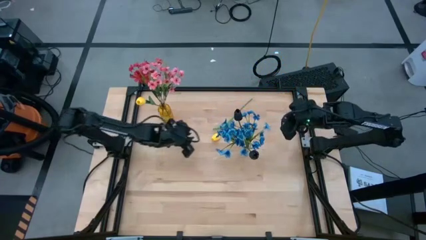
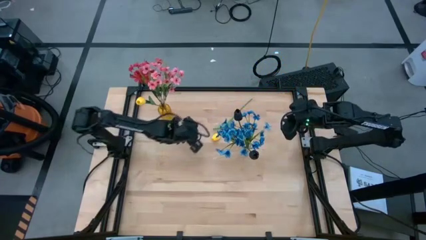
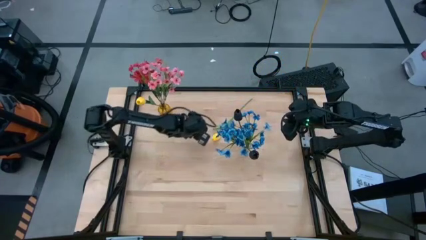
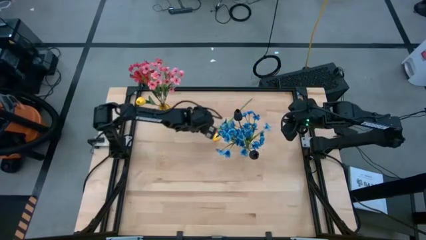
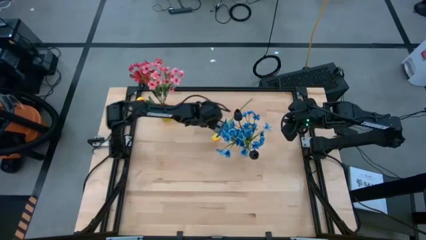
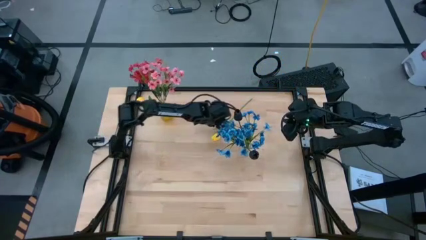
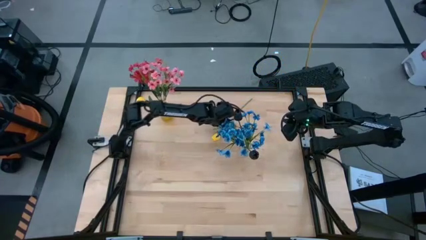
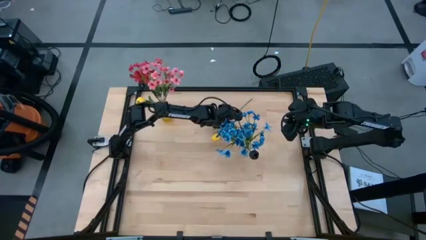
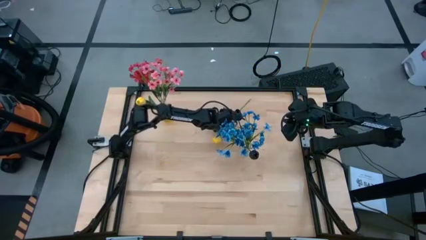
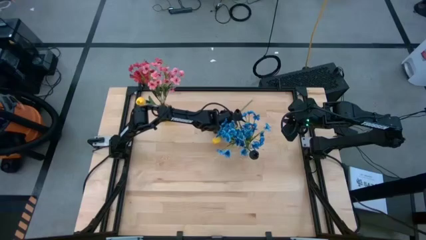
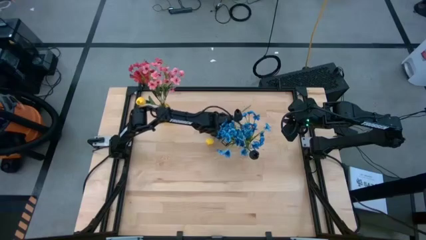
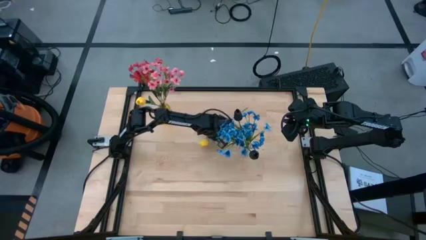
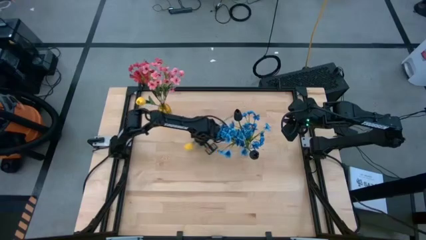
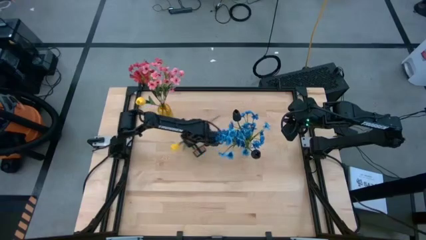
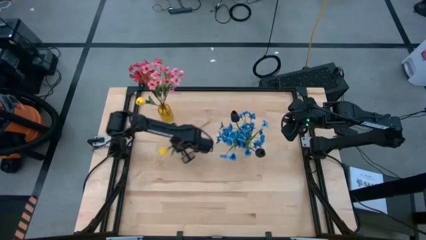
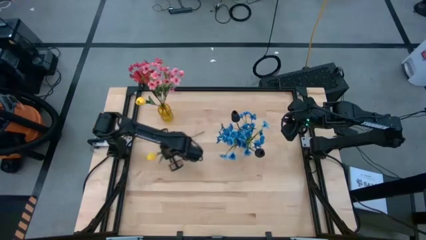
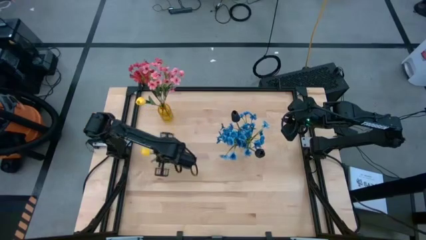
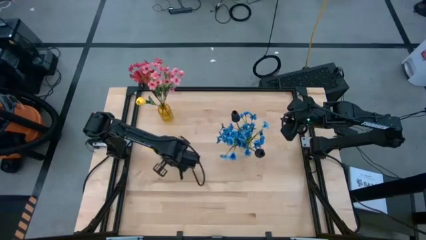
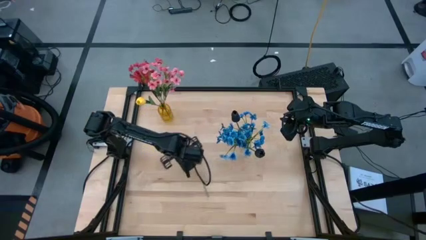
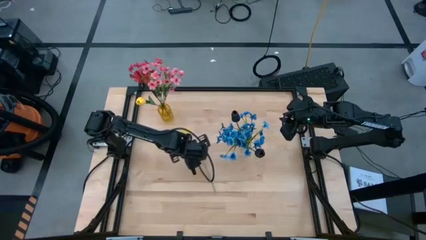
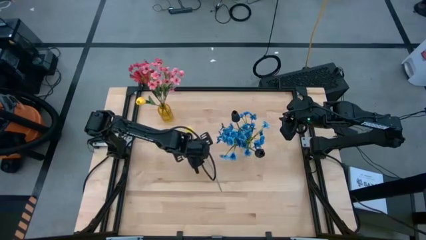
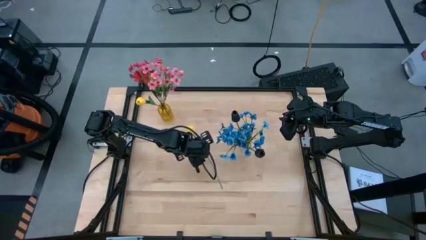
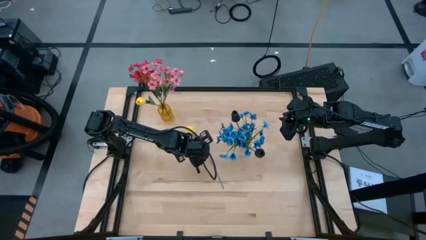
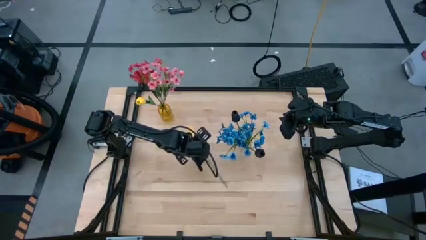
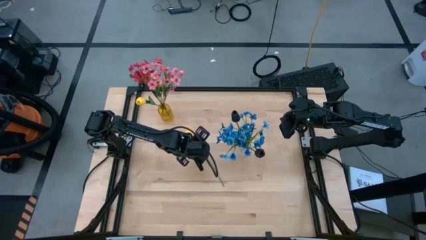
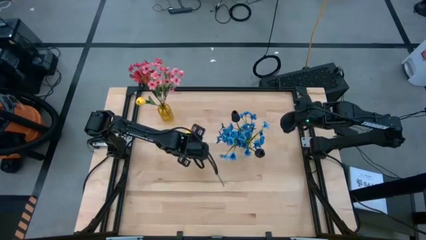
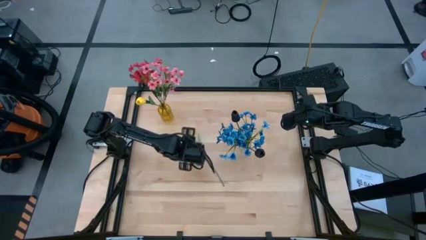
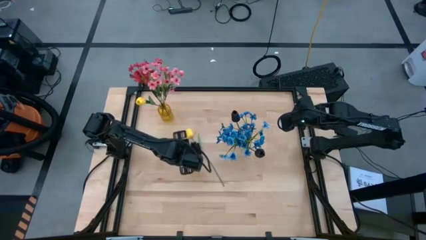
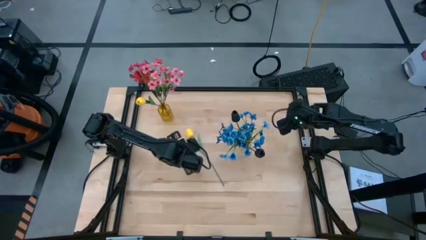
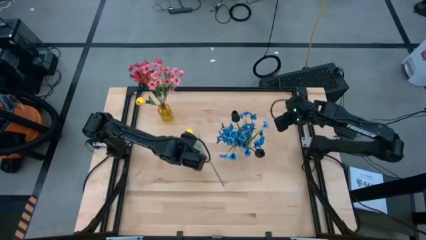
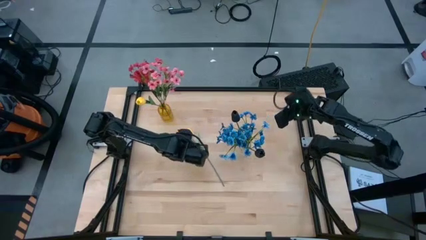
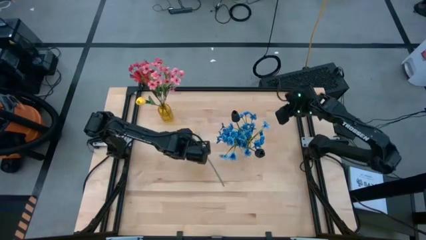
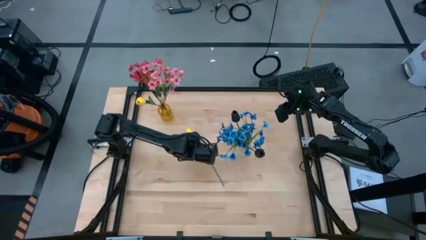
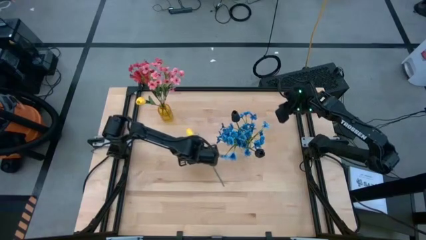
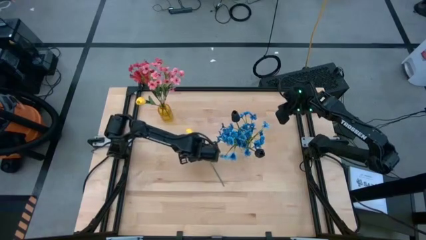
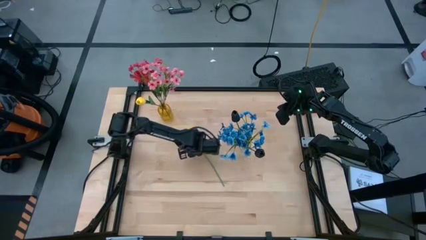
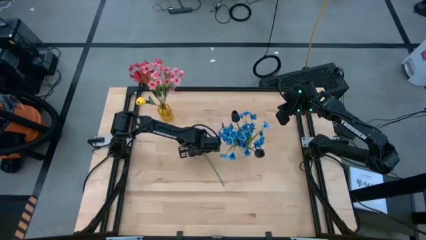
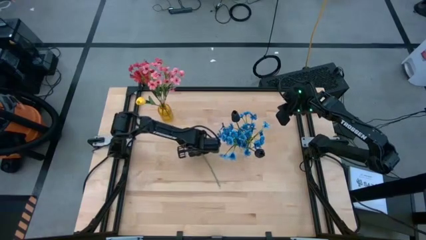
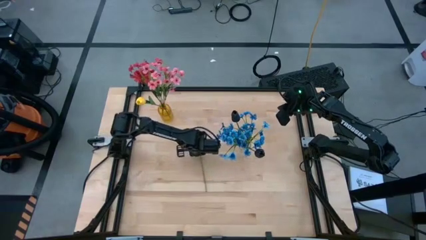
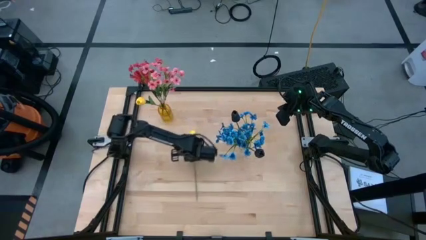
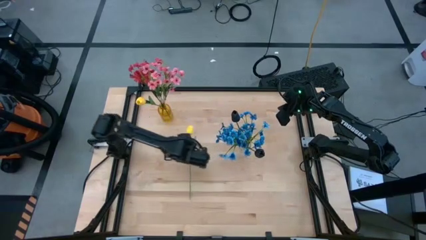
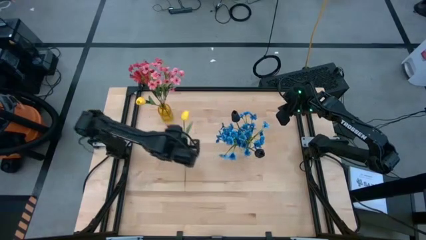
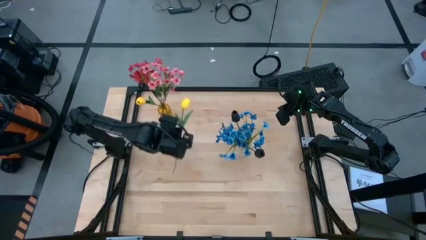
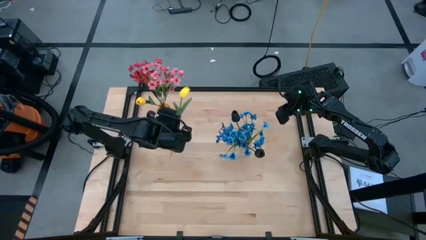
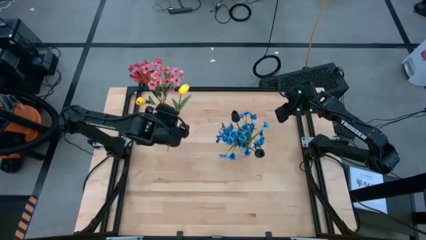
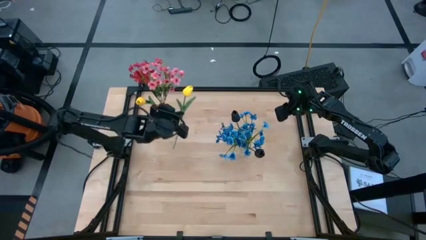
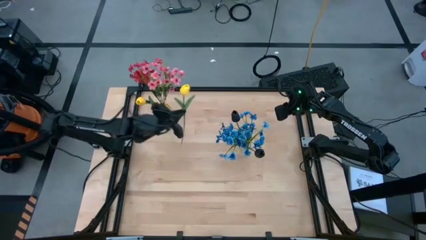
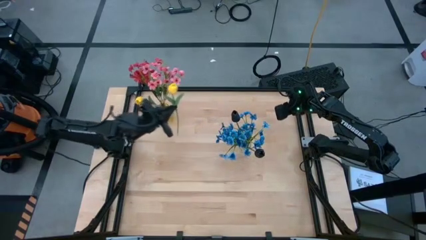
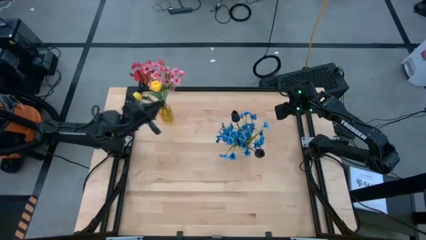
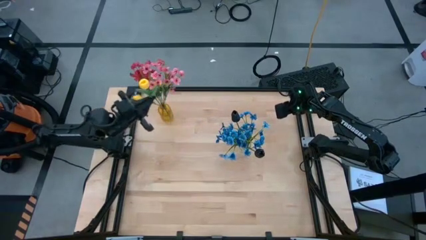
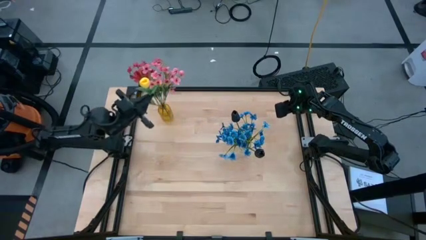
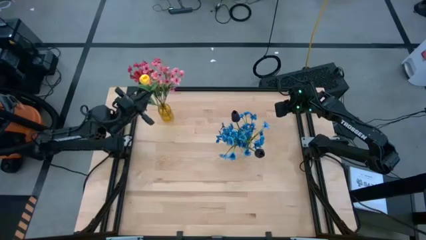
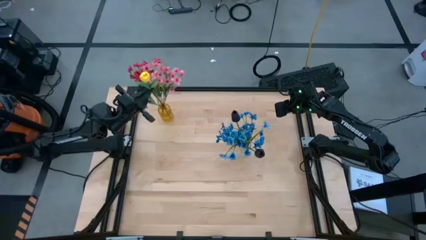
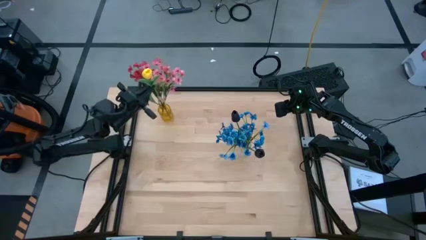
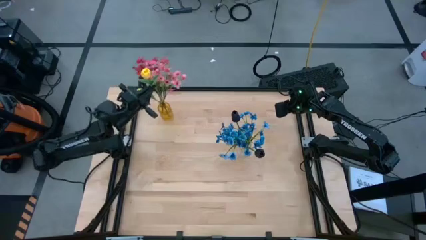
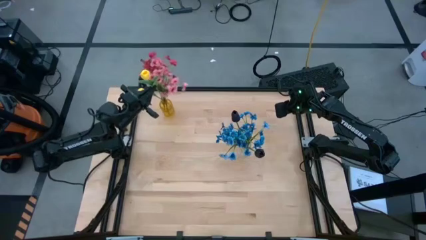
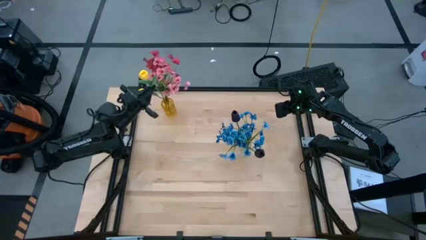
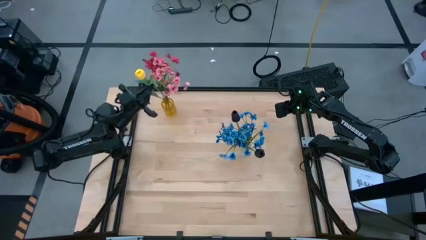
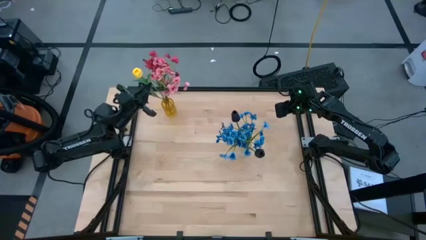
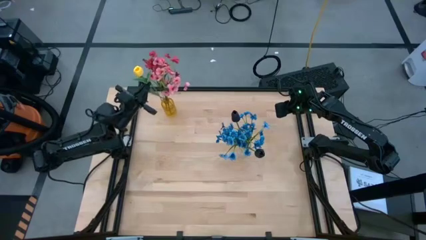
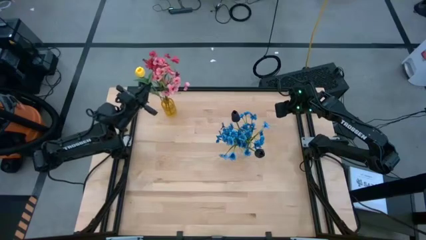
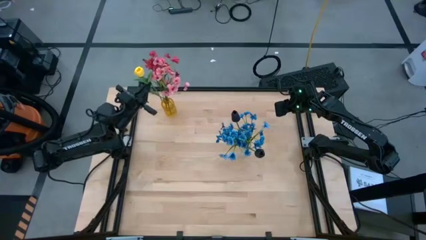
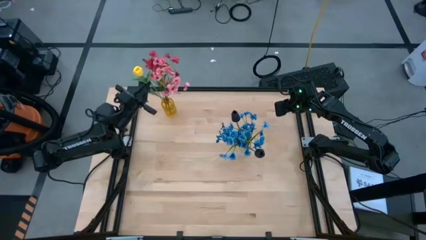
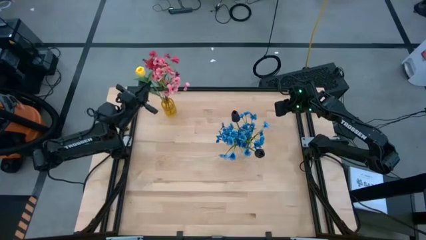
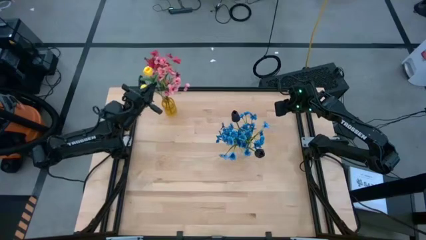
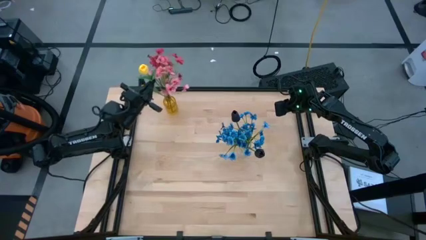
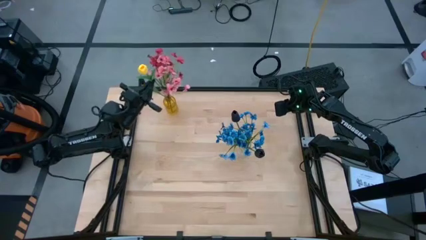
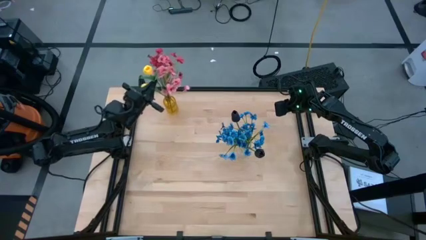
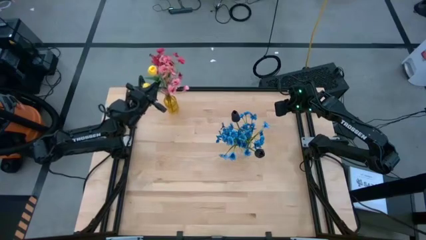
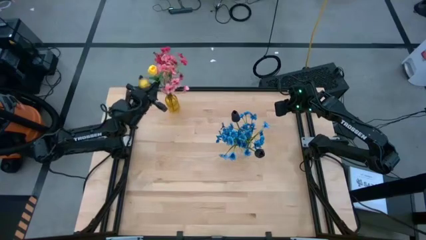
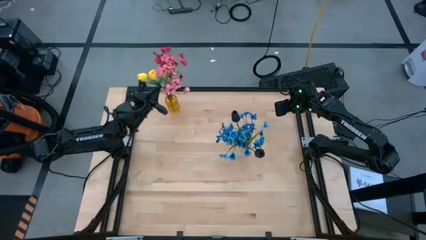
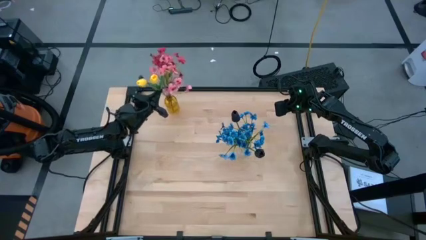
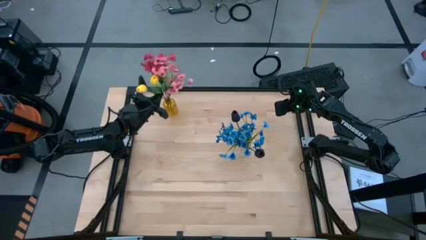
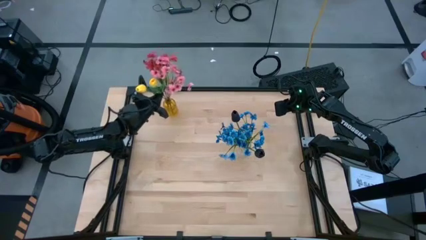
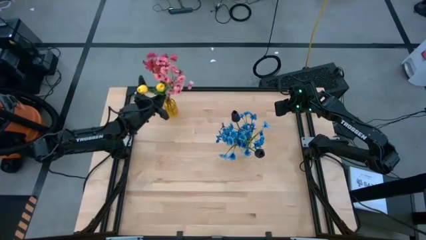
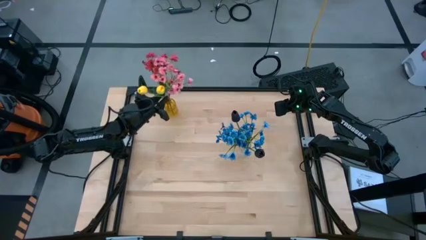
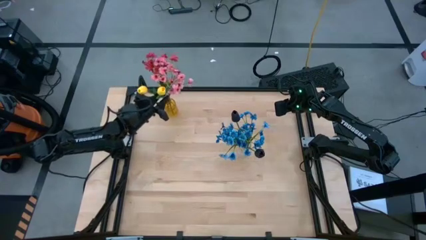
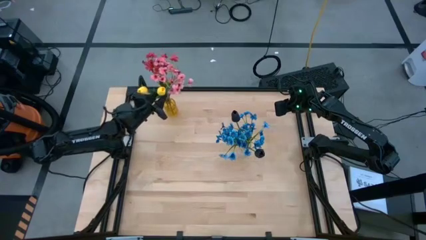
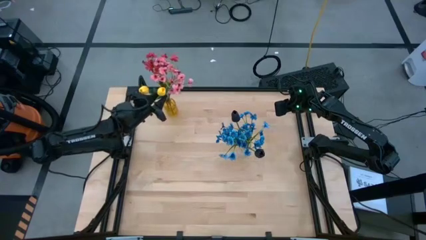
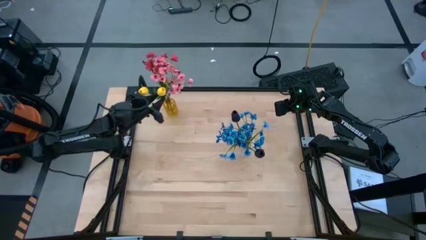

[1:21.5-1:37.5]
Task: Sort flowers into vase by color
Put the yellow tulip into the yellow vase

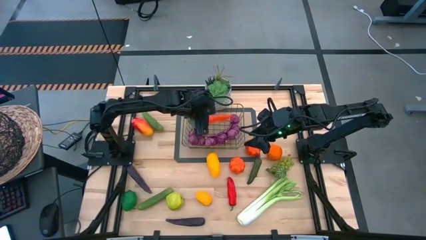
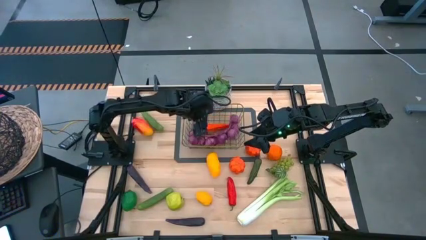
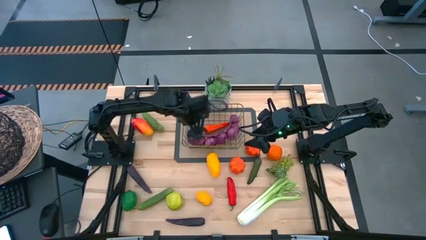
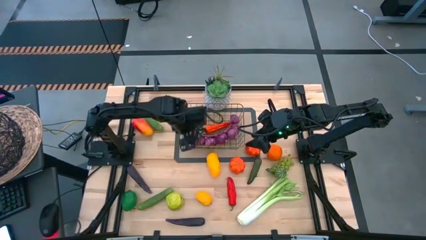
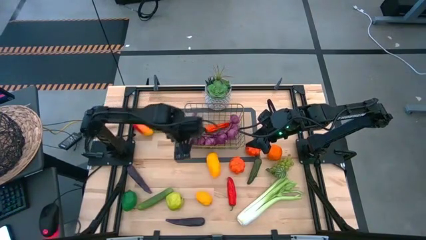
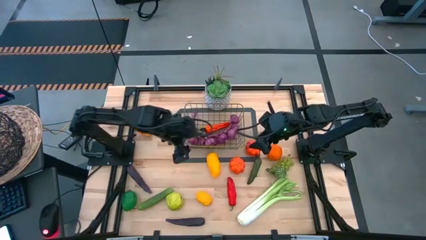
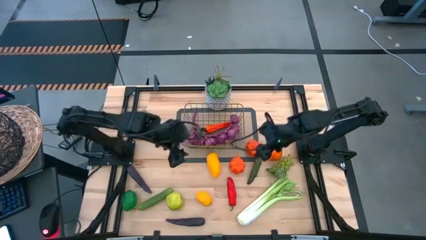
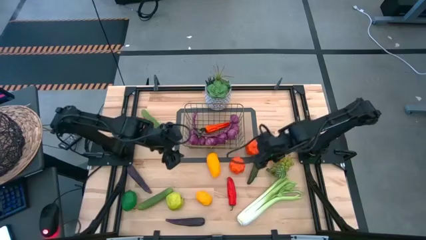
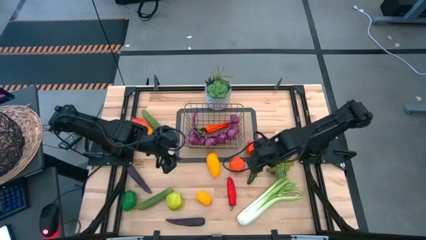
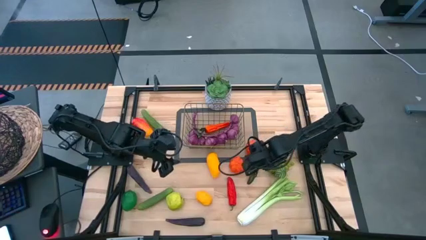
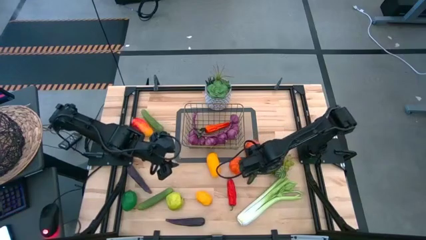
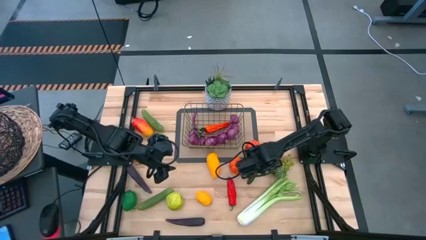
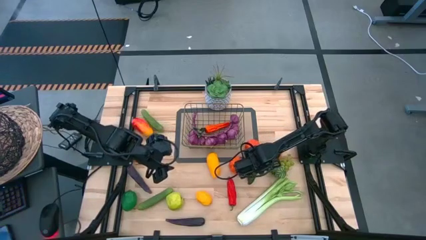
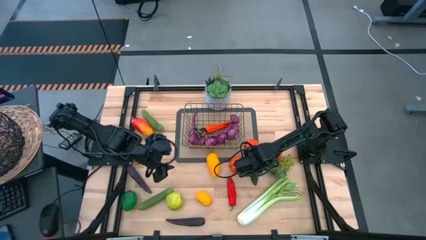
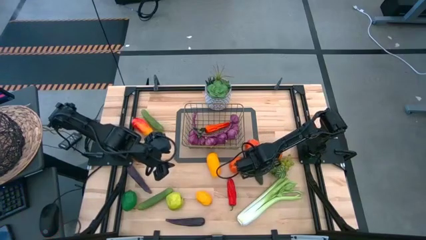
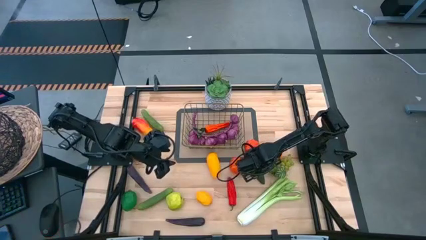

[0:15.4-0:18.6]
Task: Build produce basket
Put the green chili pepper into the wire basket
